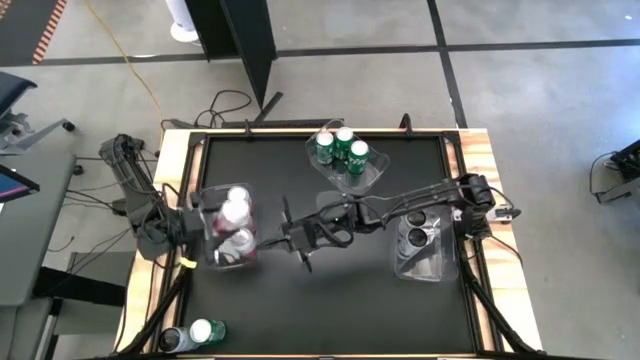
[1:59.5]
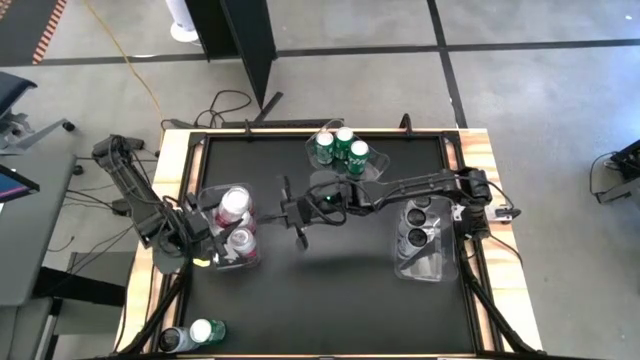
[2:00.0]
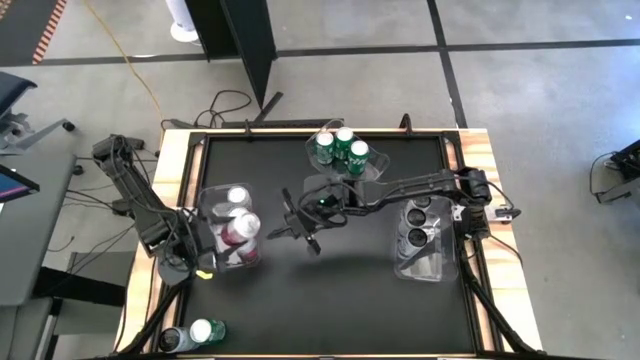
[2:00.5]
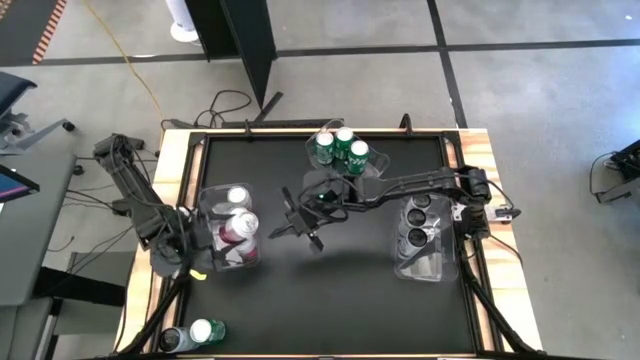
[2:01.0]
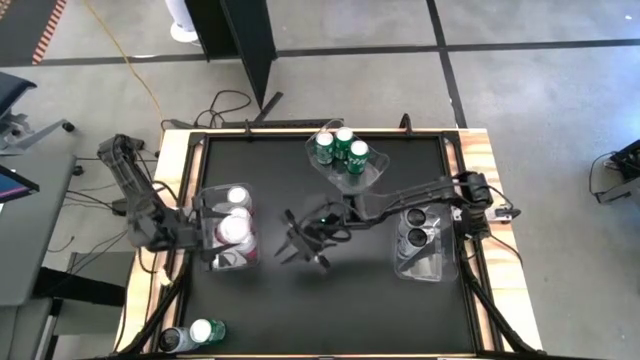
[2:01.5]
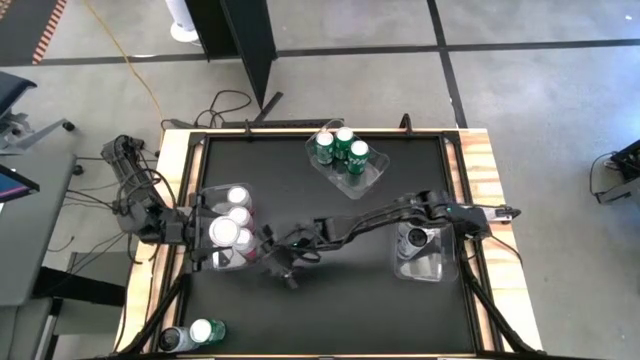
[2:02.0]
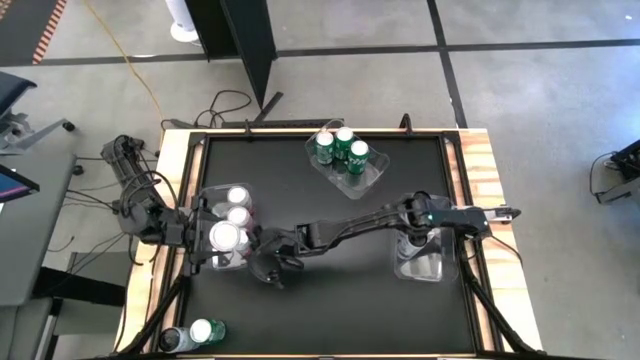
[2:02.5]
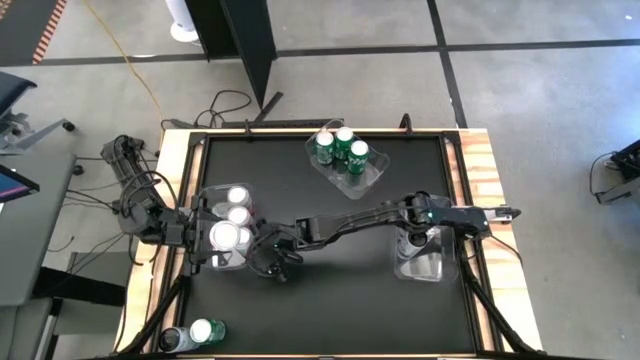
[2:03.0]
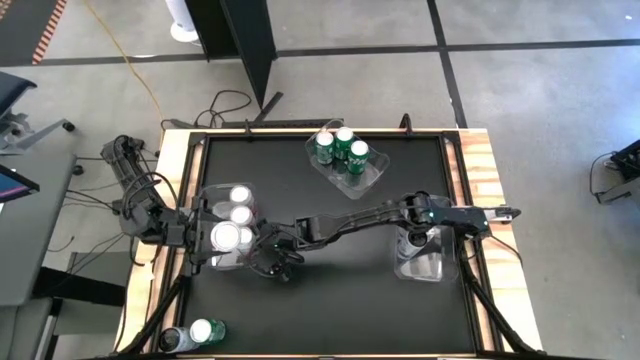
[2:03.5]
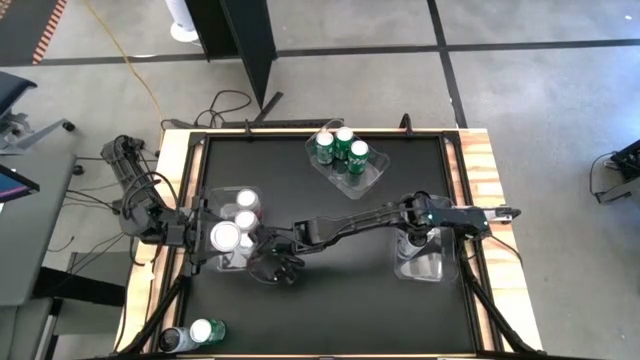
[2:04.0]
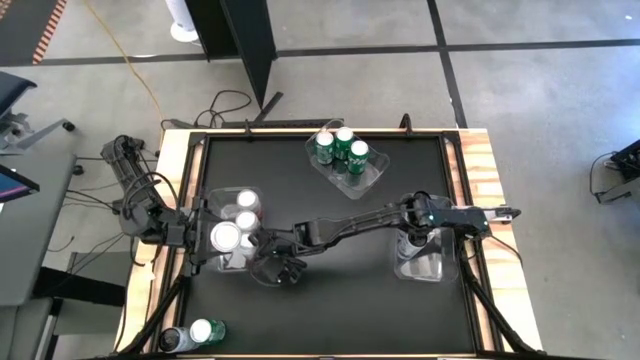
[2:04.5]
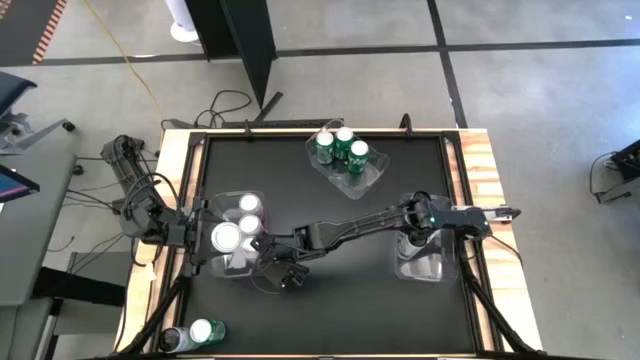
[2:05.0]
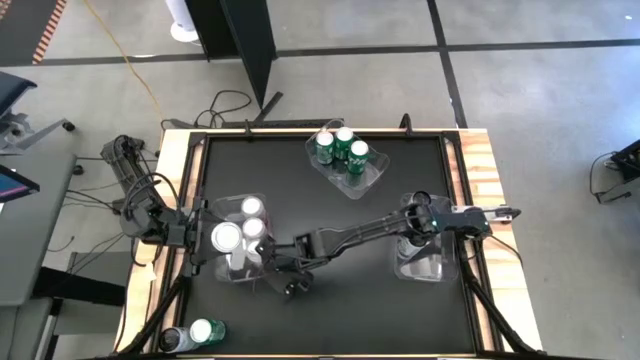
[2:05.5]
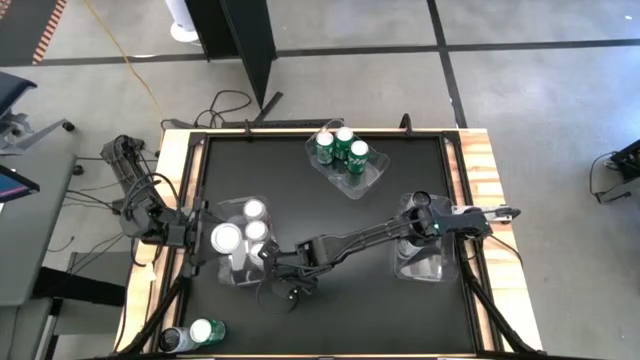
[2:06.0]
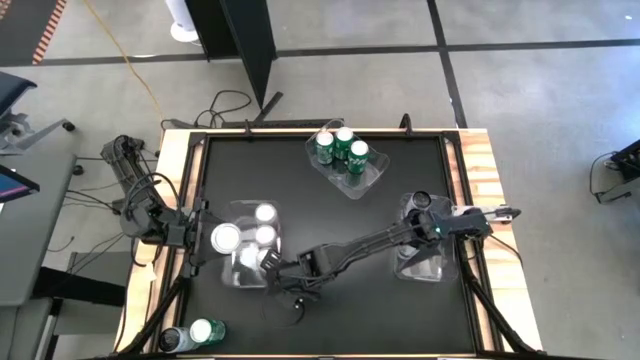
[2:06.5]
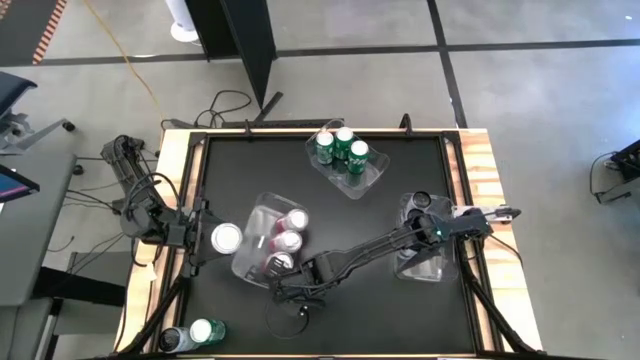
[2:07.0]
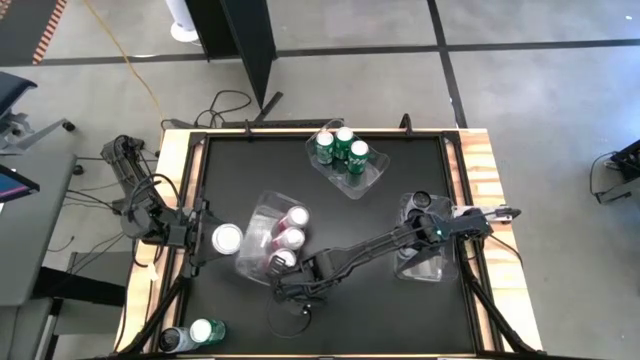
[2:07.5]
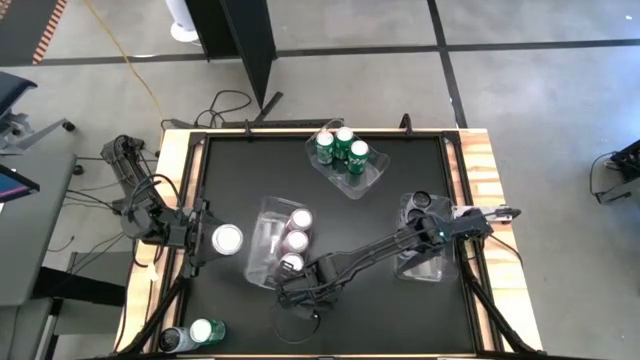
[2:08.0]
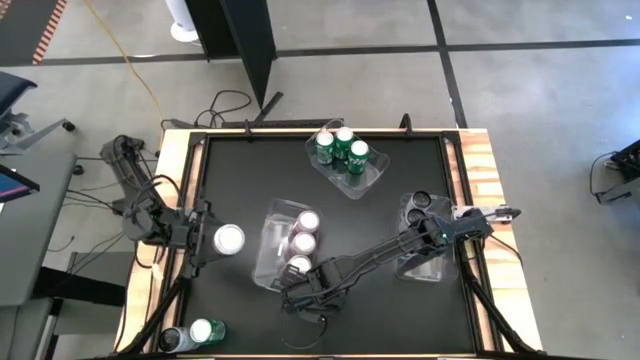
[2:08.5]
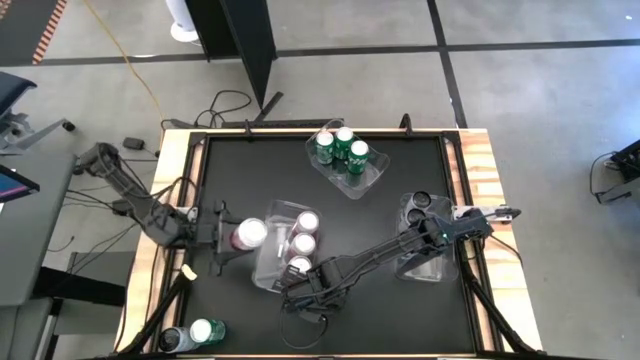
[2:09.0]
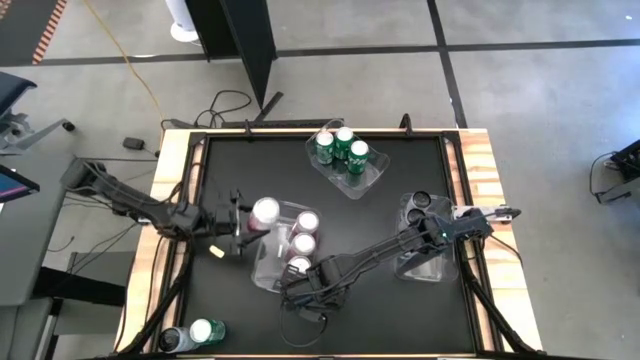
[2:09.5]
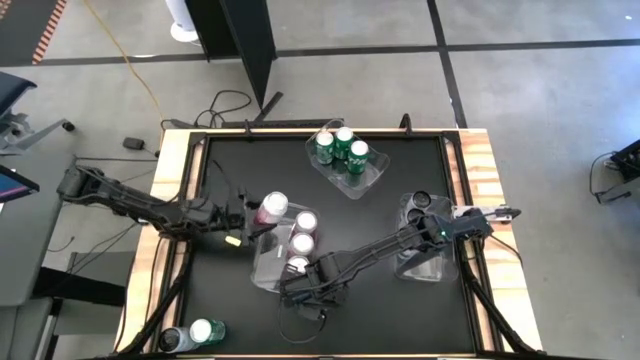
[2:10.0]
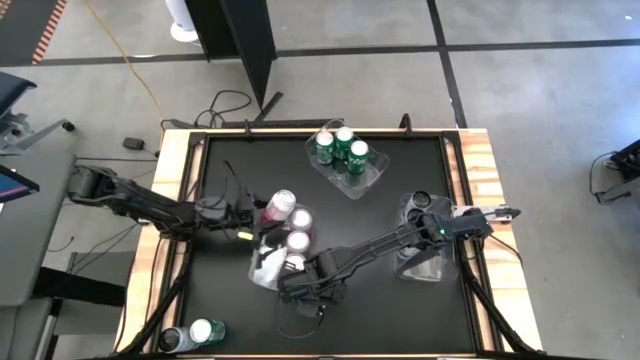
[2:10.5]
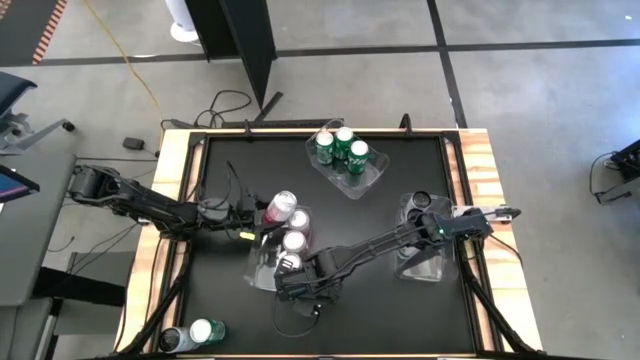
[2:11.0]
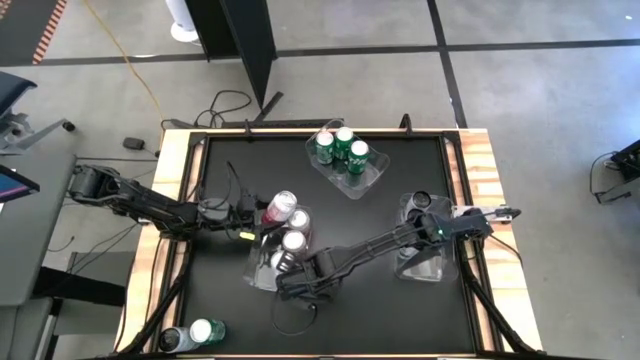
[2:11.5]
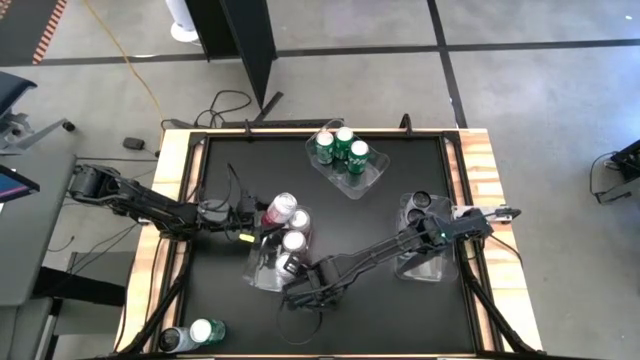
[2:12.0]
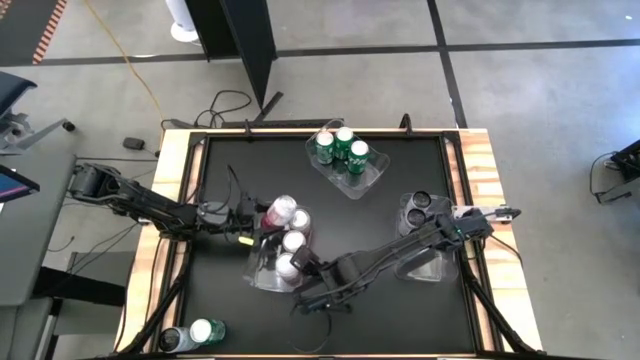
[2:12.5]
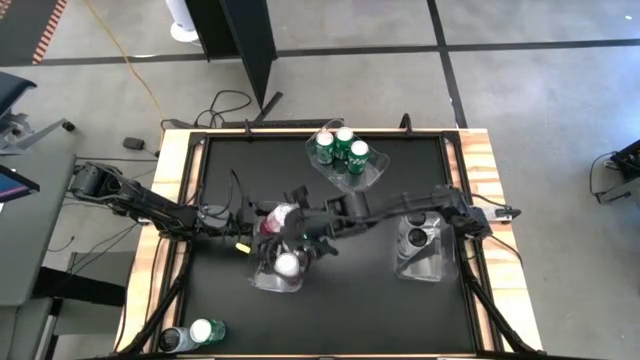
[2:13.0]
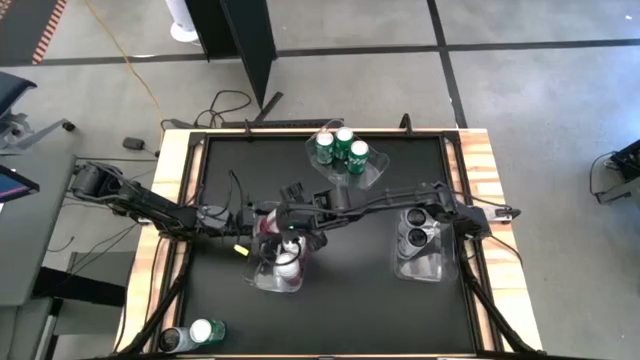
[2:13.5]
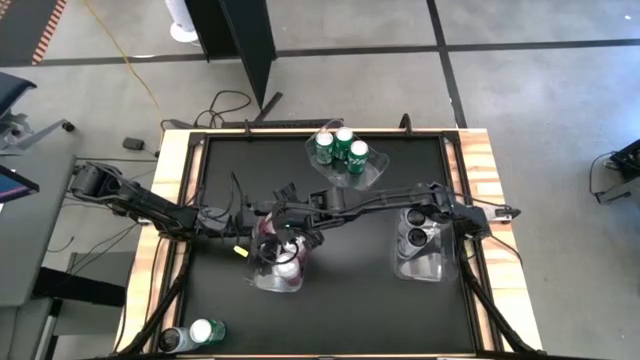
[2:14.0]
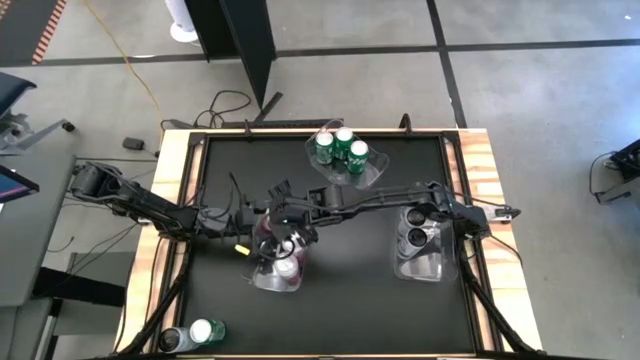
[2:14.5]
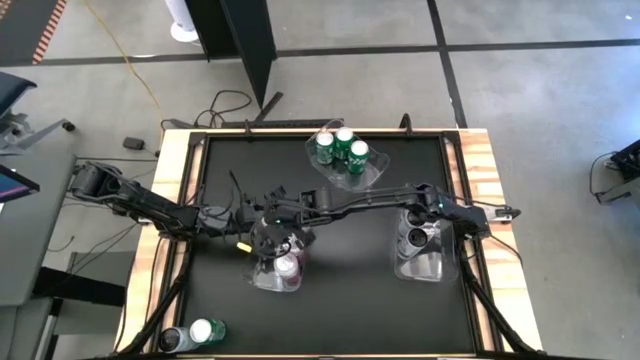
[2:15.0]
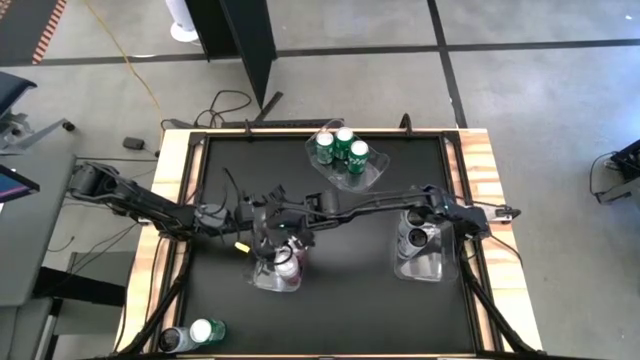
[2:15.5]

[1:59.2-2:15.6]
Task: Sort soda cans
Put the pink white soda can into the left transparent bin

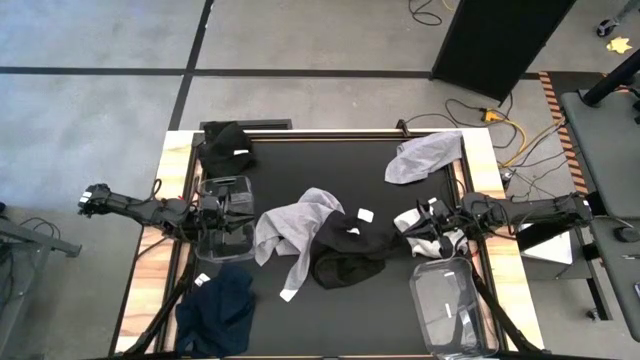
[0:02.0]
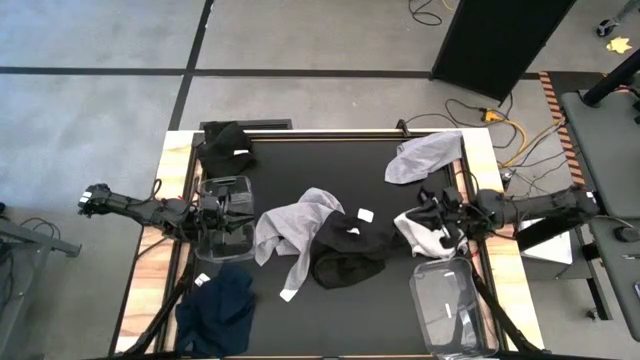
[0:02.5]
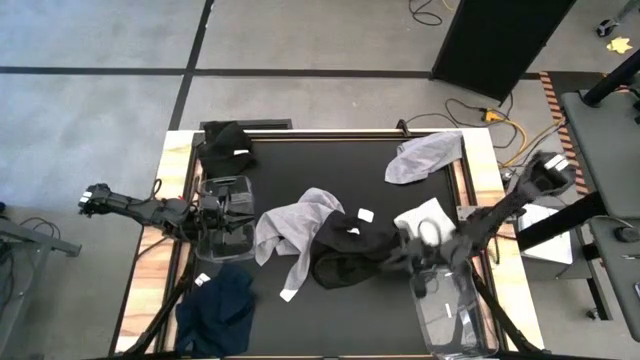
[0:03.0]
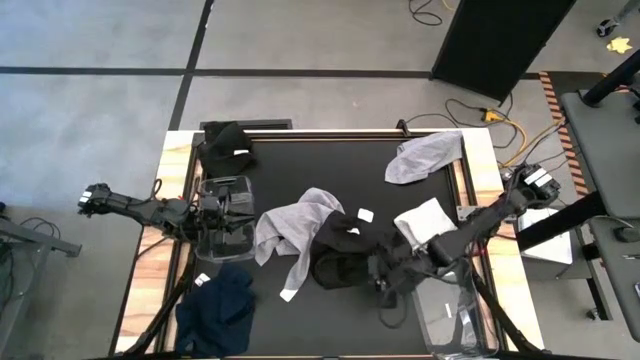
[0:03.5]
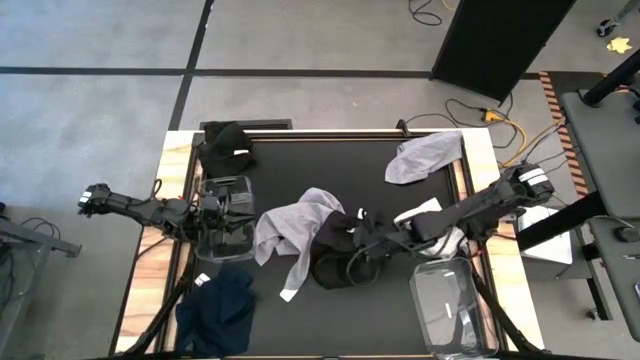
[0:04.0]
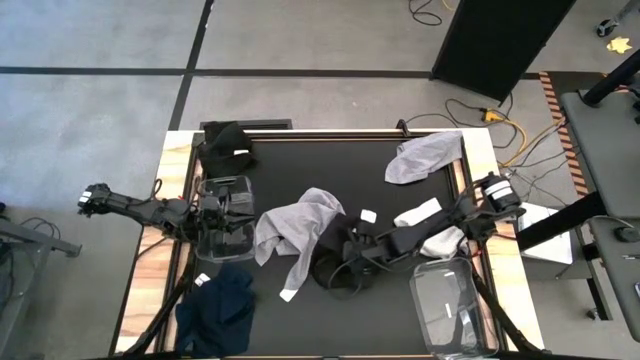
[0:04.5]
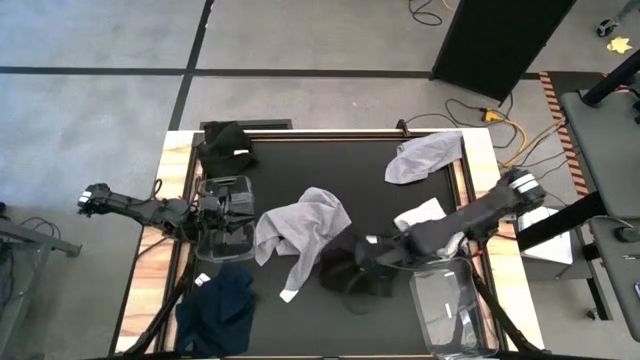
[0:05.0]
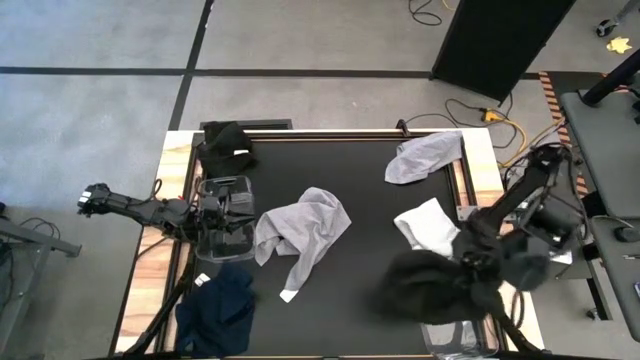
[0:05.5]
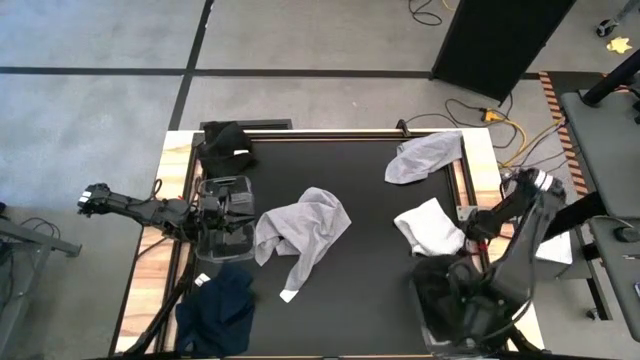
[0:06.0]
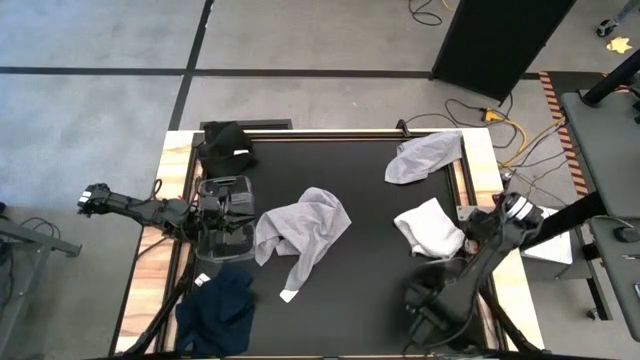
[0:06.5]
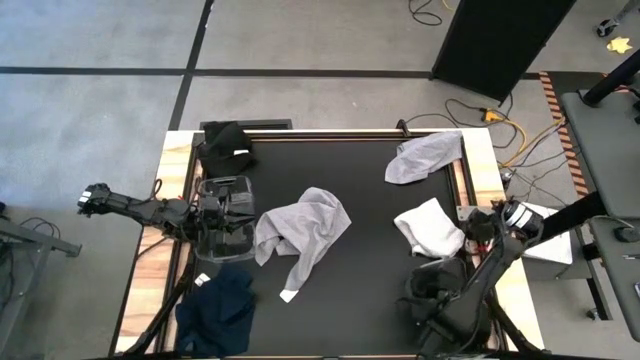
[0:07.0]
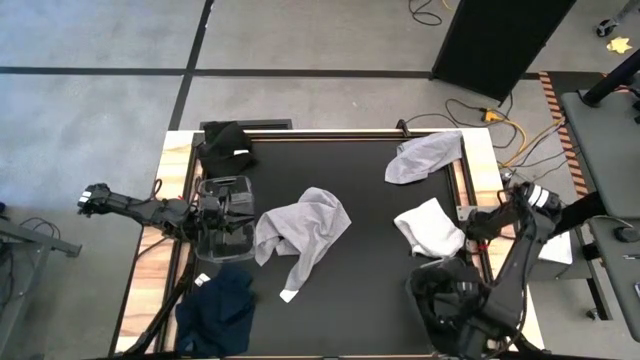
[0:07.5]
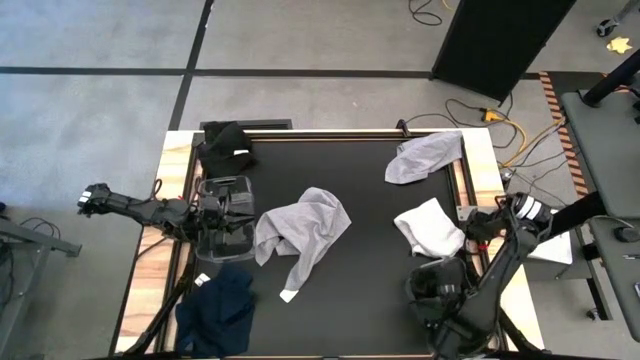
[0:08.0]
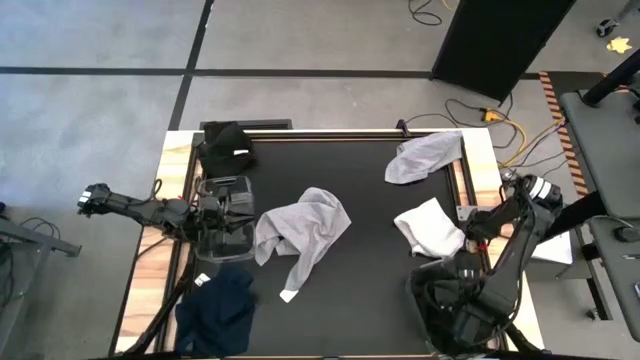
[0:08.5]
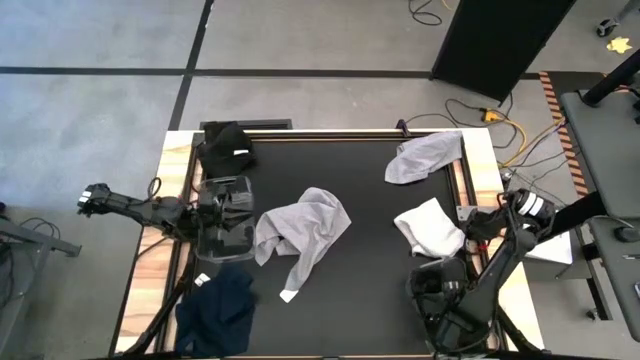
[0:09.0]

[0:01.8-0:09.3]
Task: Sort towels by color in basket
Put the bottom black towel into the bottom transparent bin
